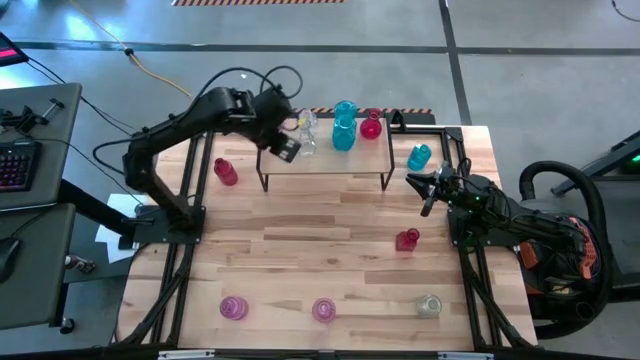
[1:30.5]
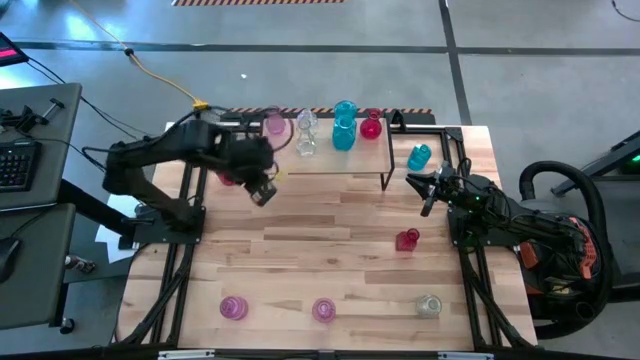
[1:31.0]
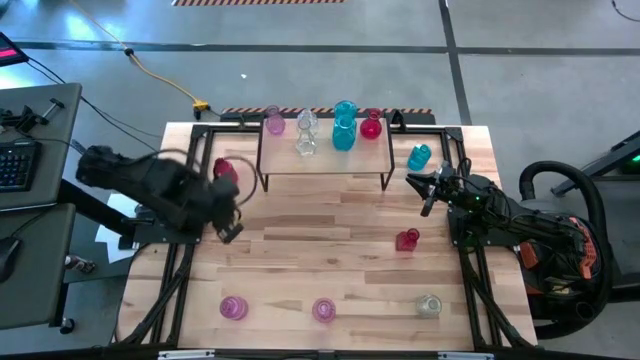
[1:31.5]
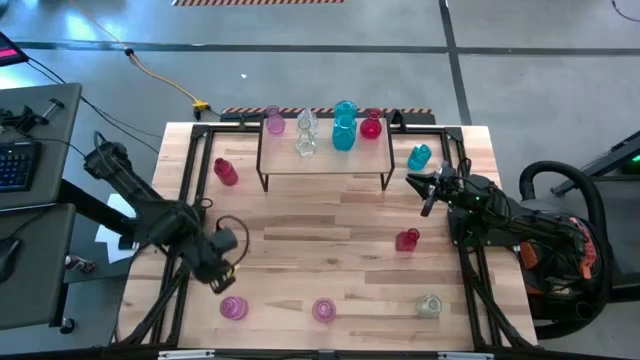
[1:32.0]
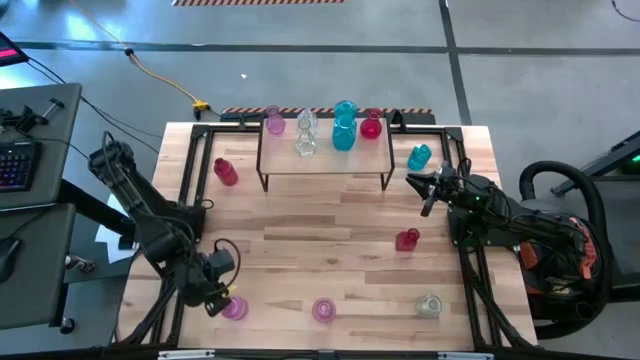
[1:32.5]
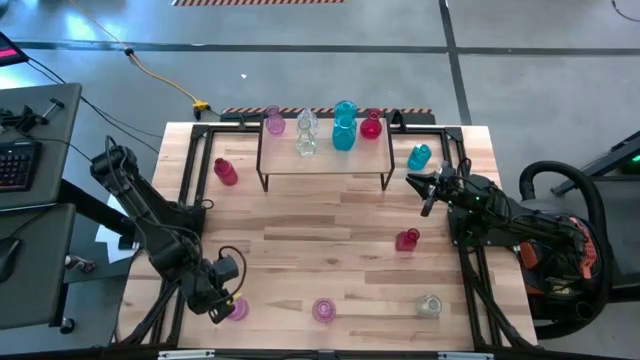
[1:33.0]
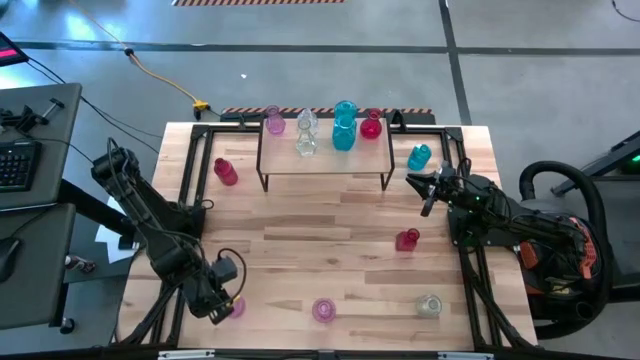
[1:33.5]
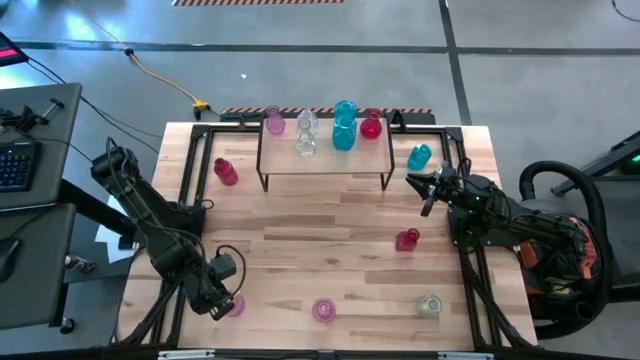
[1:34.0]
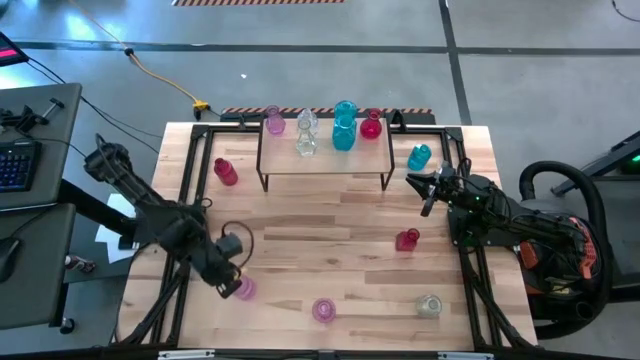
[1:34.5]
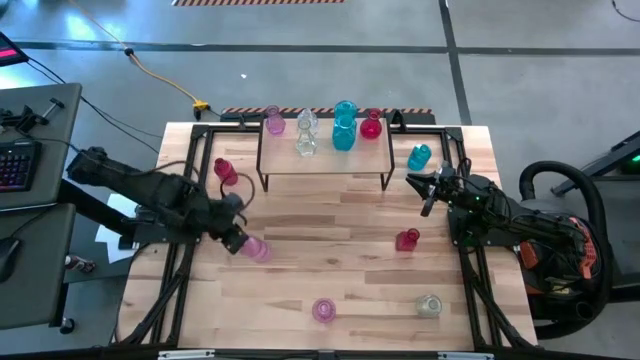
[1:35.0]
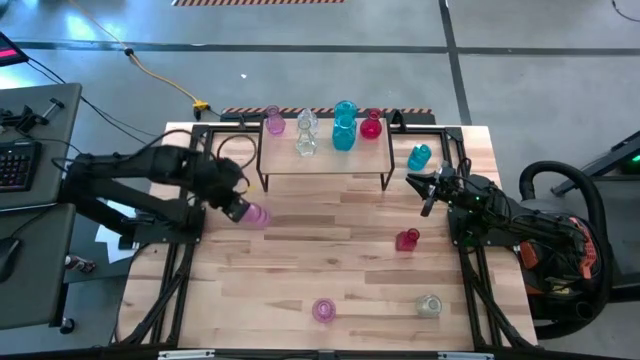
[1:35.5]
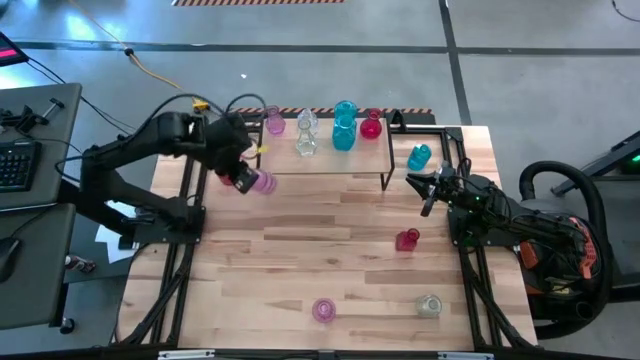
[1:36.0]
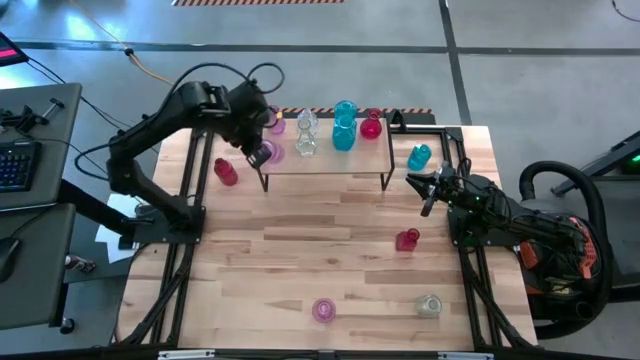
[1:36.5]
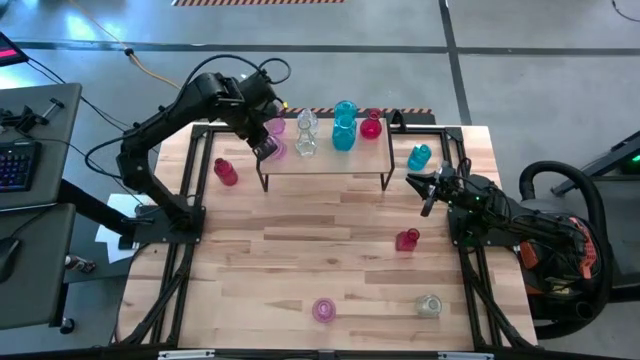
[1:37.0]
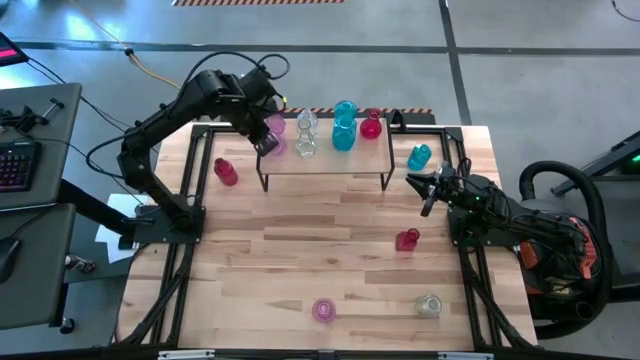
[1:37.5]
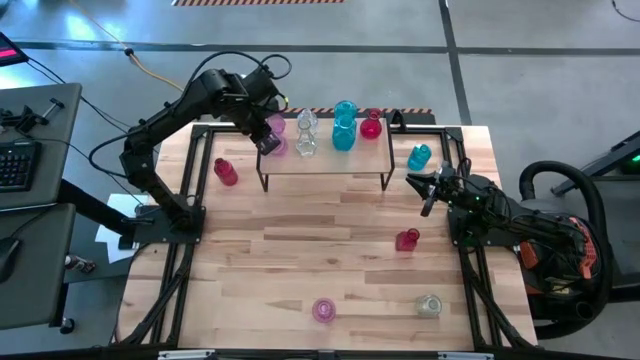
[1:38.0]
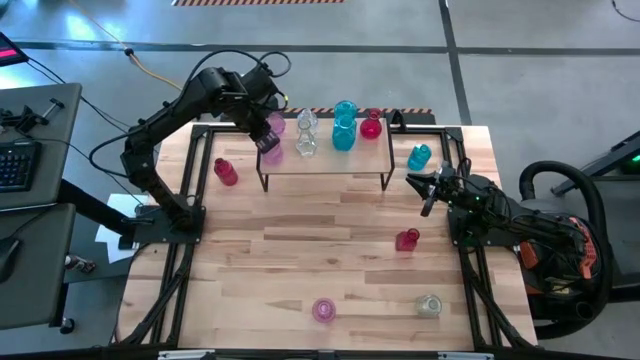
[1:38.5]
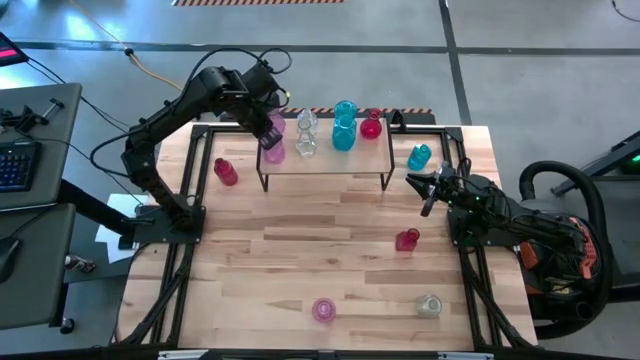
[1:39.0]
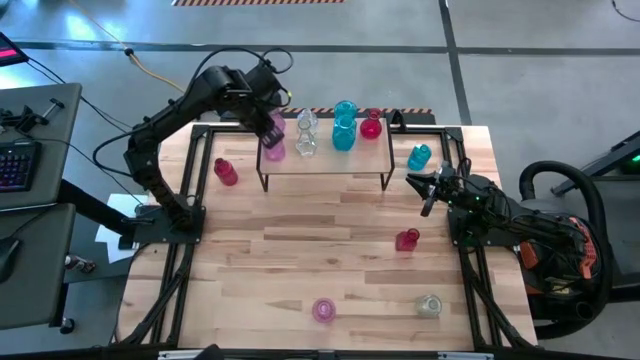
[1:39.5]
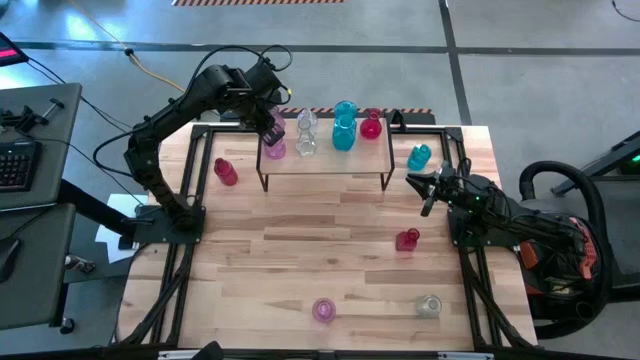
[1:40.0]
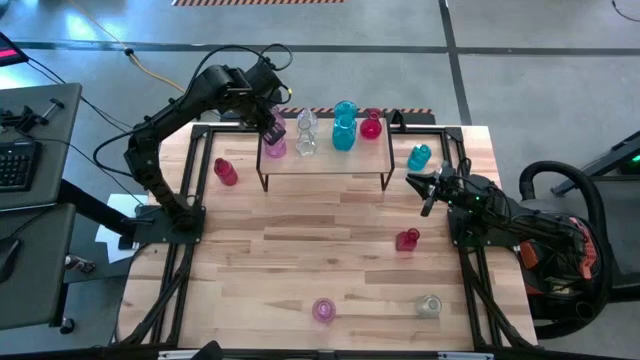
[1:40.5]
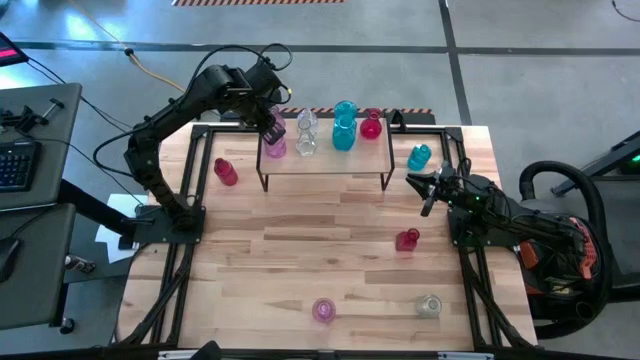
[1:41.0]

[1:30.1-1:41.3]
Task: sort vases onto shelf
Put the left light violet vase on the shelf aligned with the other light violet vase

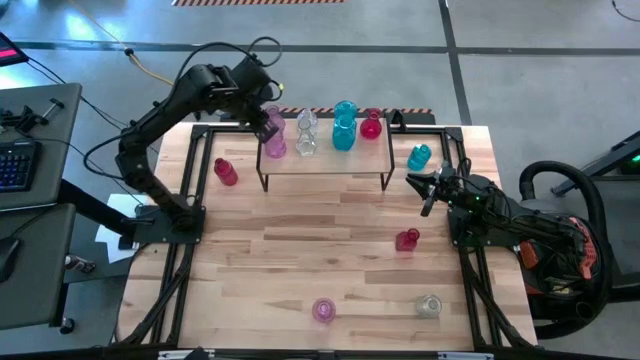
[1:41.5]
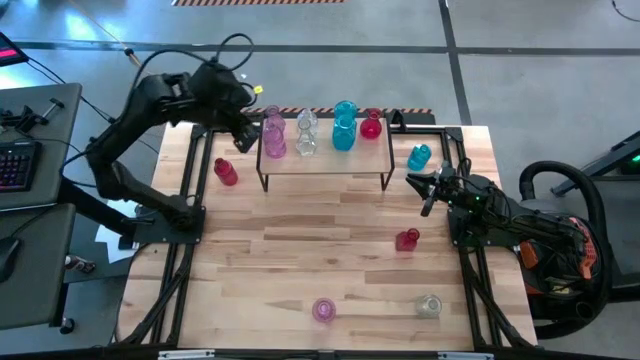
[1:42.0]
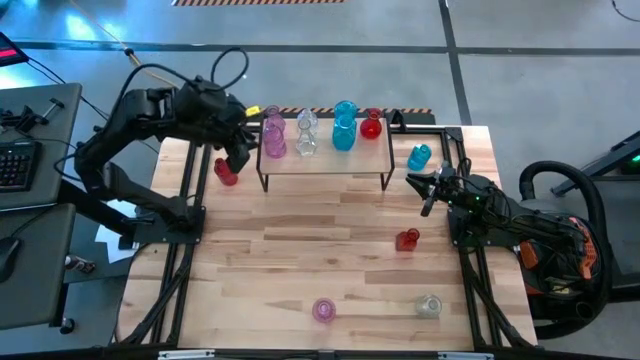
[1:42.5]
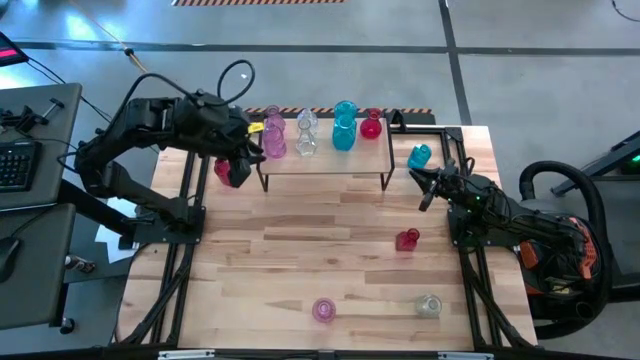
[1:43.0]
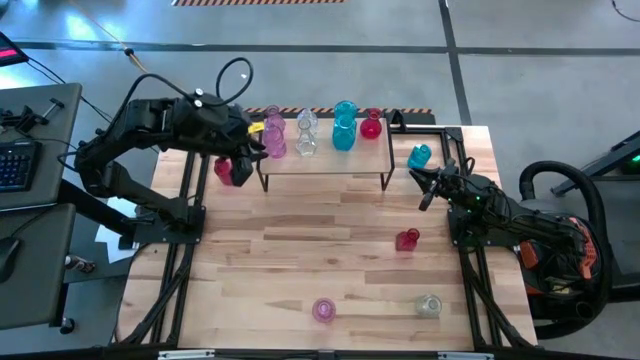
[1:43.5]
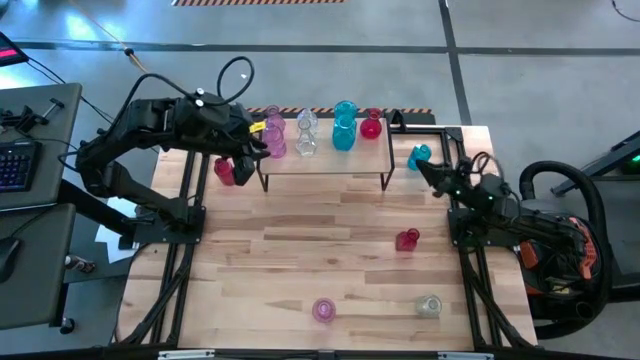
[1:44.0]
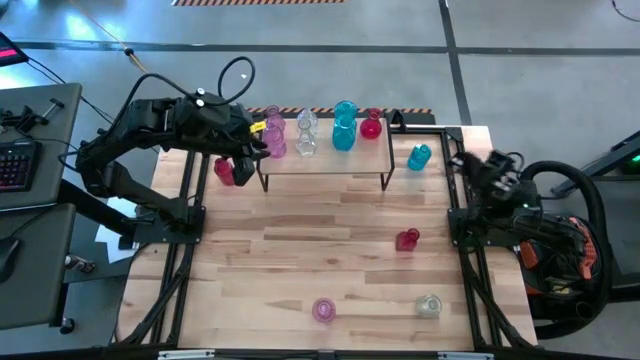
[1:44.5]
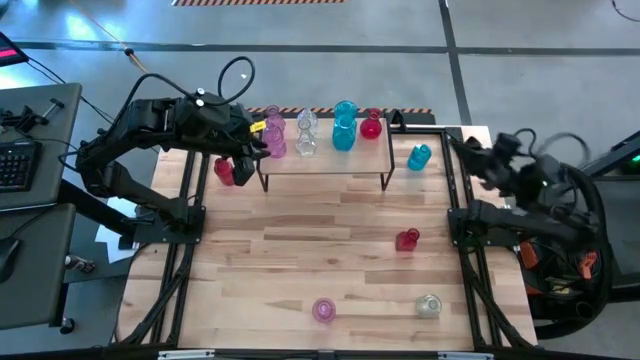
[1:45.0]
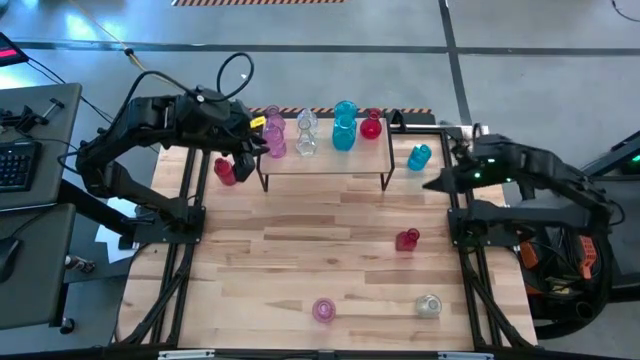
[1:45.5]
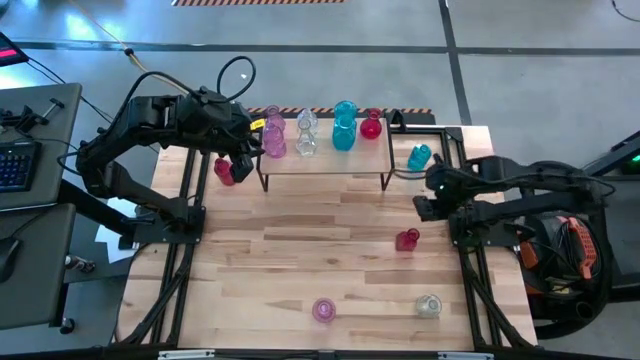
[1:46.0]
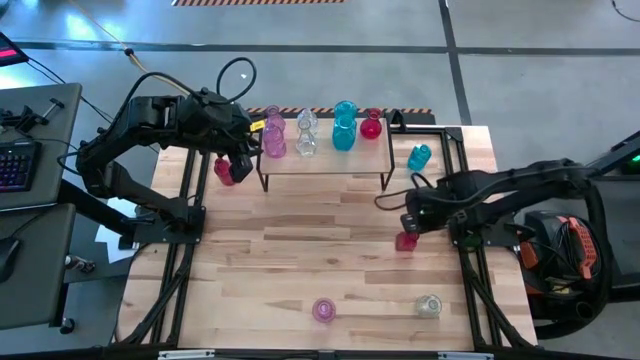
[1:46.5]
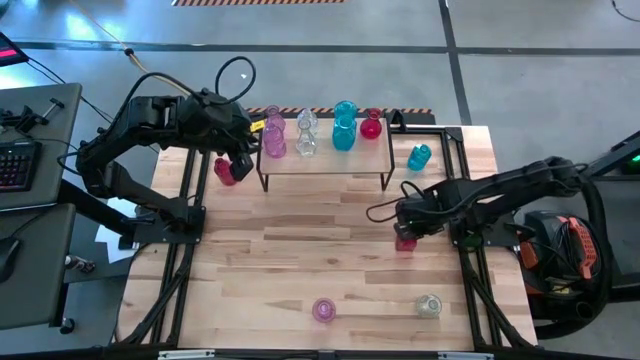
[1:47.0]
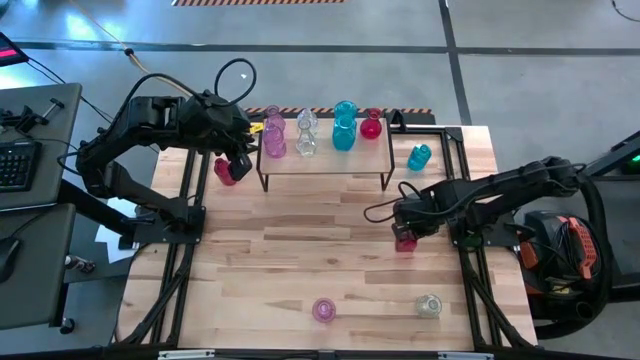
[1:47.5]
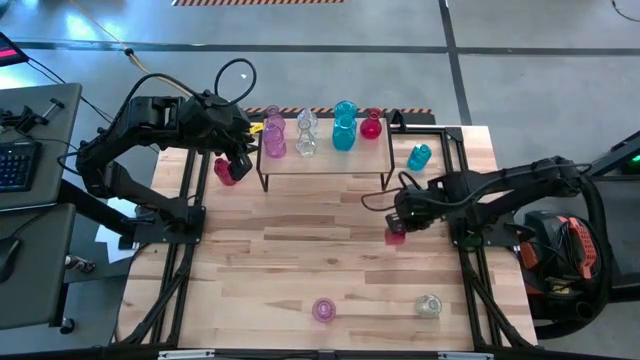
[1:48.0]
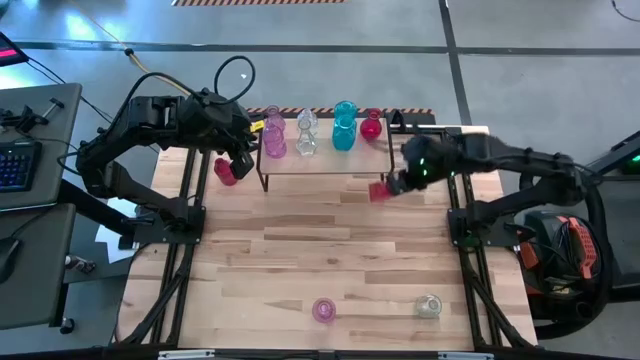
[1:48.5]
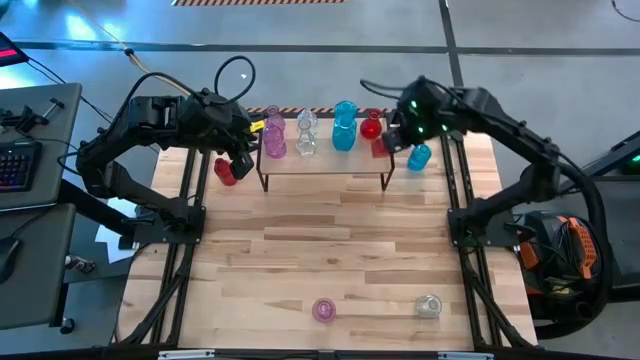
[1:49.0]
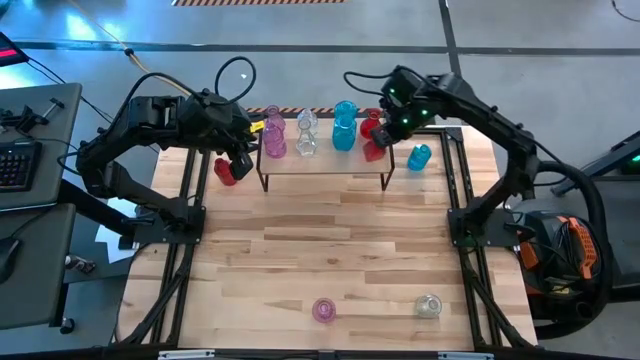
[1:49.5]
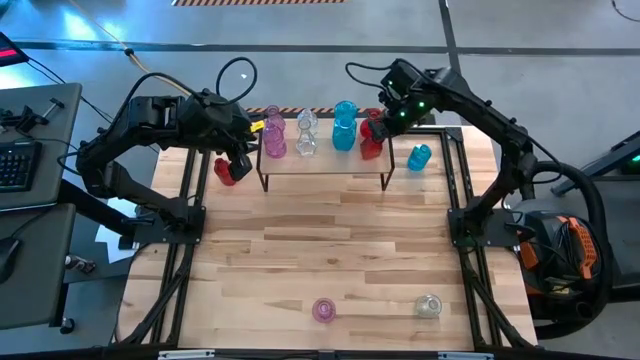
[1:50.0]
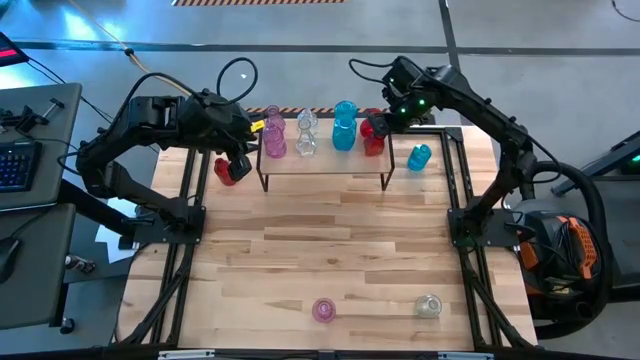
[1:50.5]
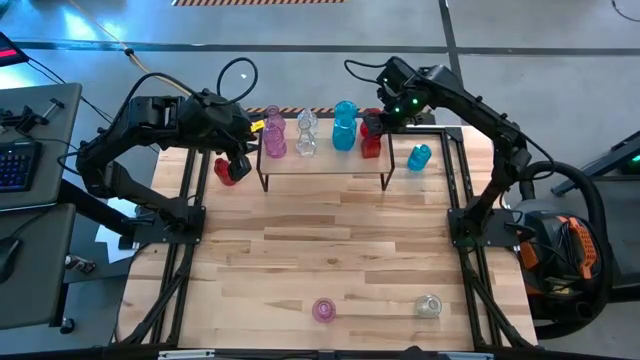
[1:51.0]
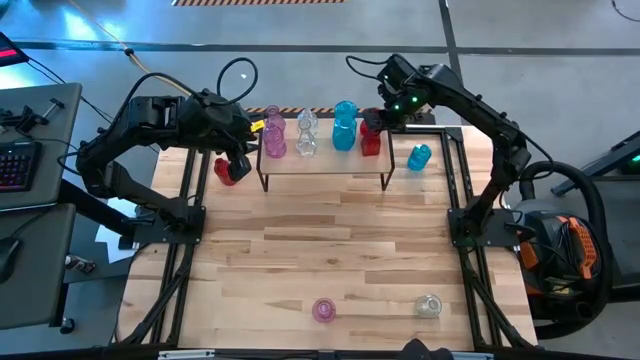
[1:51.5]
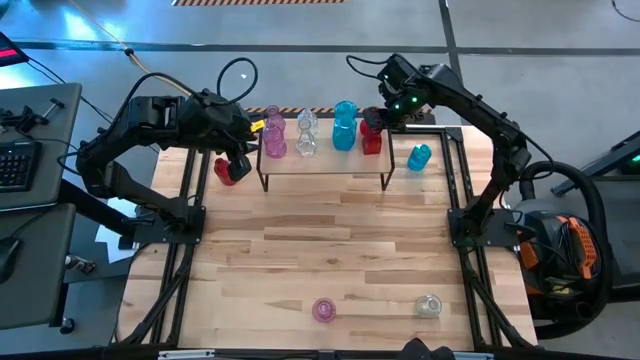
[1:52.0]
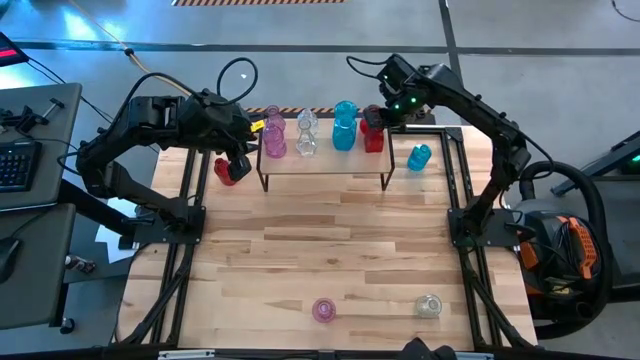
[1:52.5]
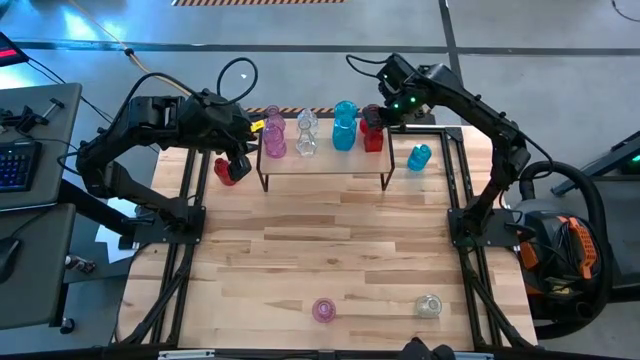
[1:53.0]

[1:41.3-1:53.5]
Put the bottom red vase on the shelf aligned with the other red vase
